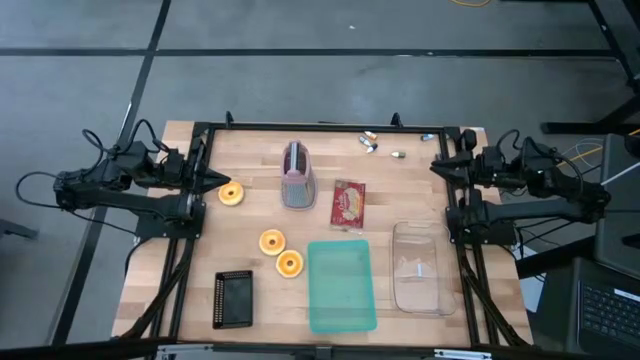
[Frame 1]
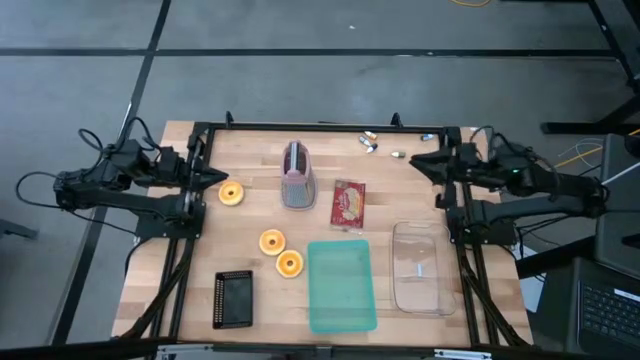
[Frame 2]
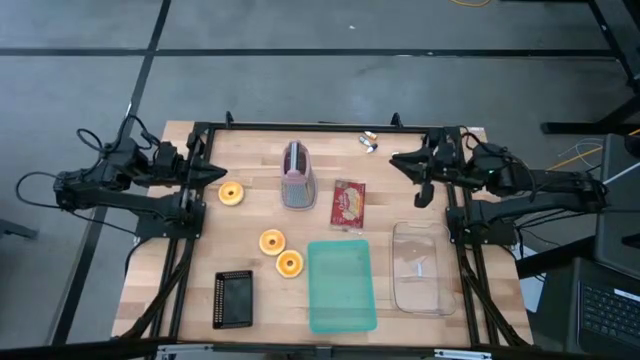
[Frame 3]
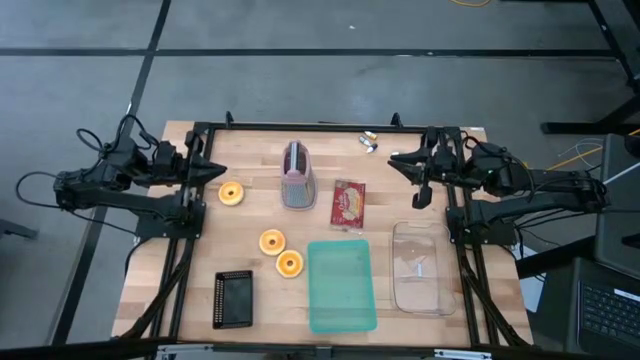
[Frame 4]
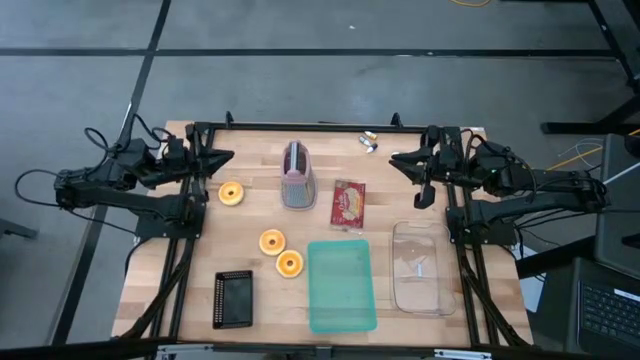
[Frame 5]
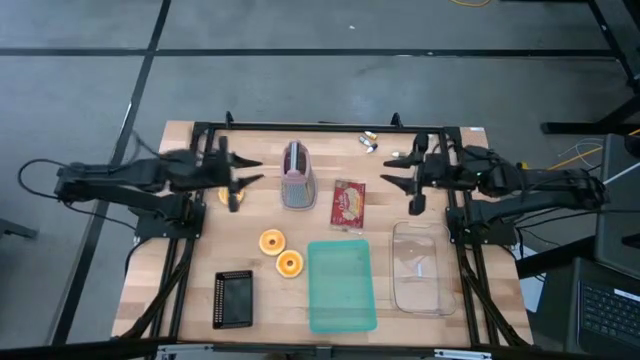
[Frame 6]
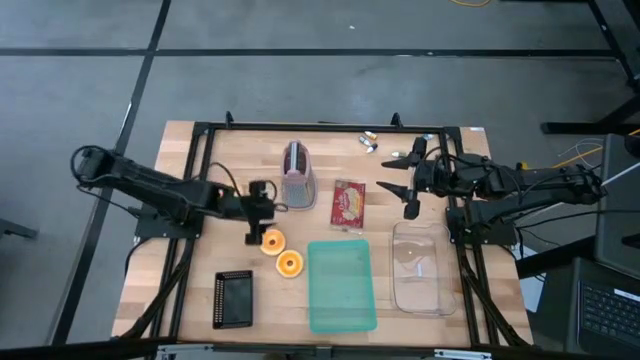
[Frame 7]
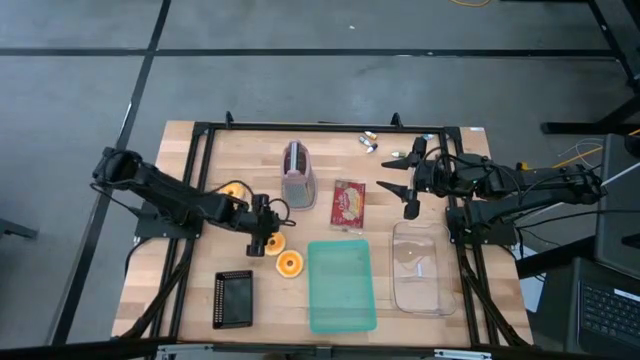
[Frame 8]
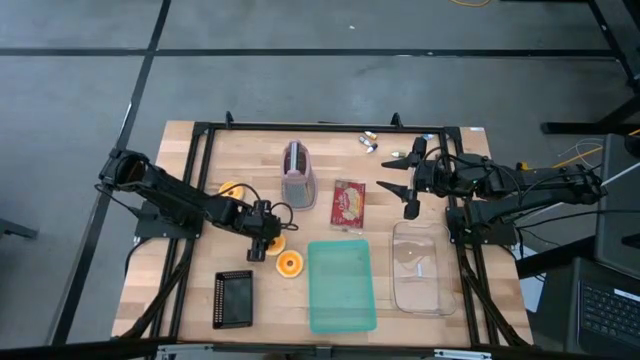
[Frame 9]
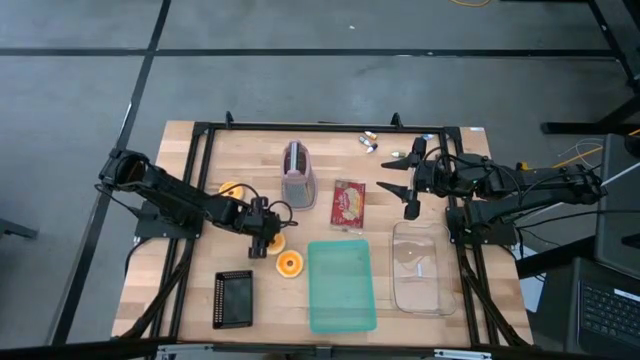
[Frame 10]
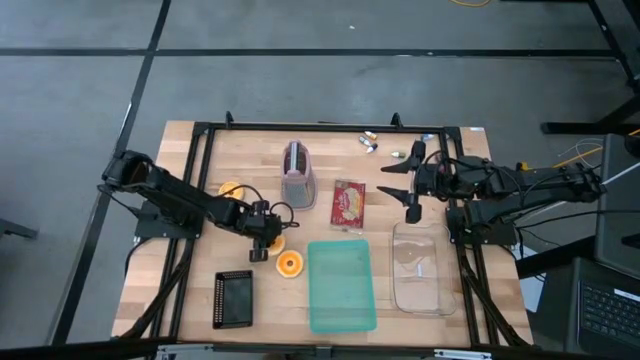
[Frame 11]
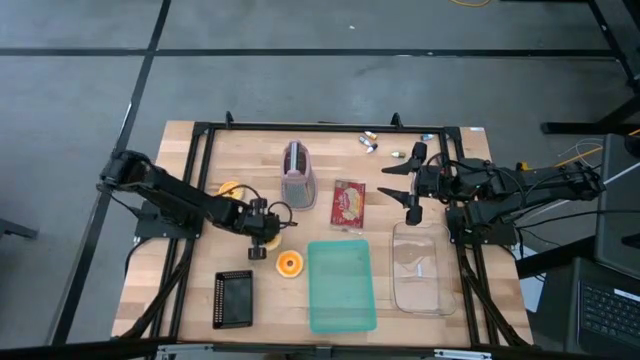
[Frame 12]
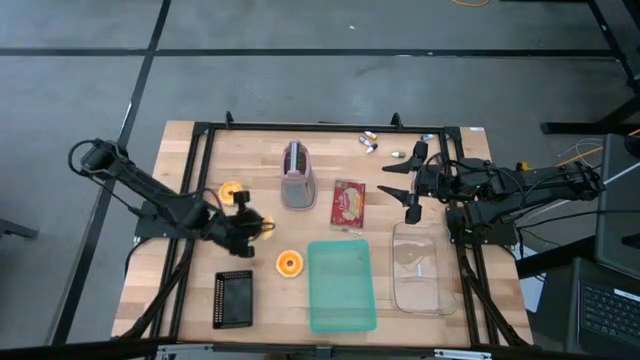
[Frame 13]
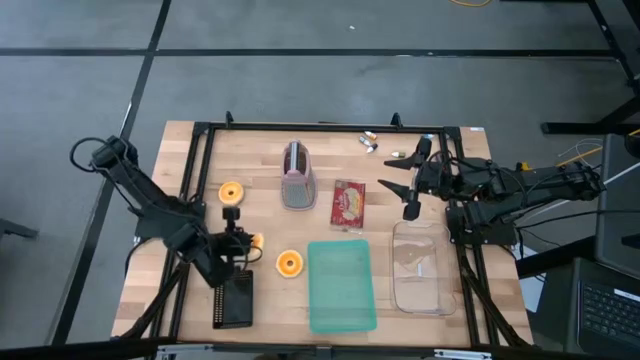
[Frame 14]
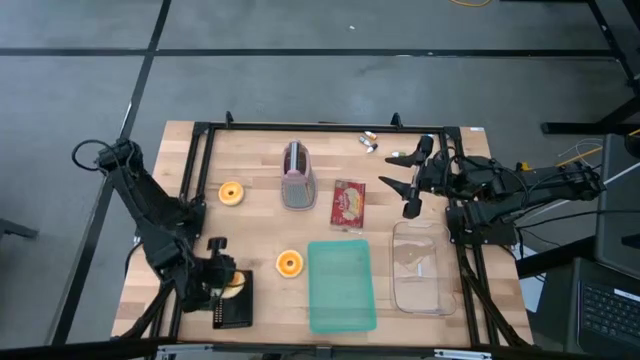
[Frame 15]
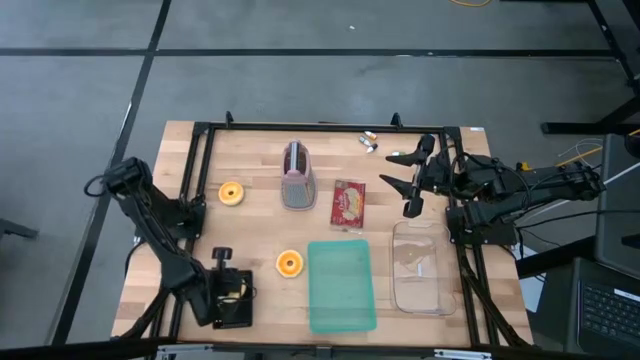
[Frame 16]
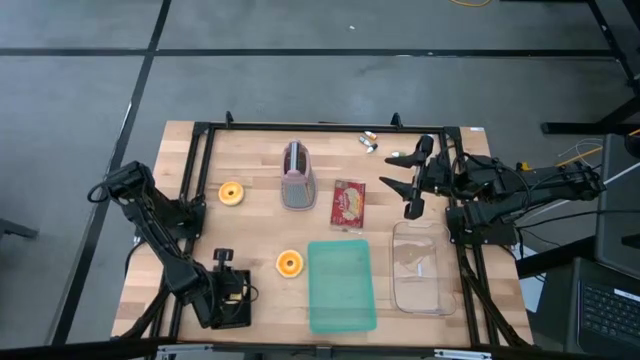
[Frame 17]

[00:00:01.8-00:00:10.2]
Task: Pick & Place Food Item
Put the middle yellow donut into the black bin

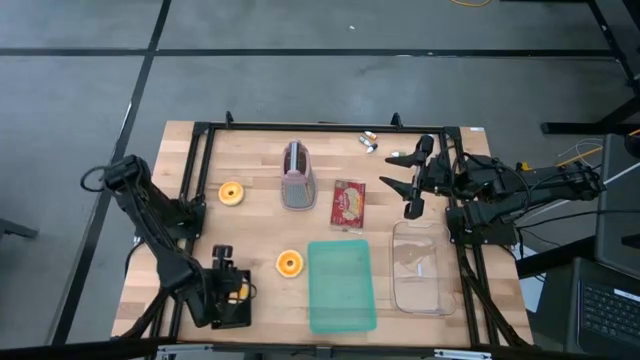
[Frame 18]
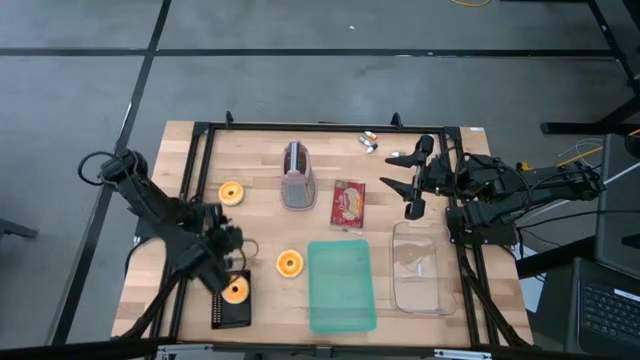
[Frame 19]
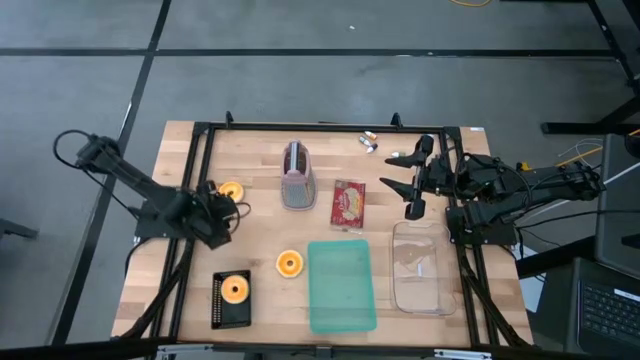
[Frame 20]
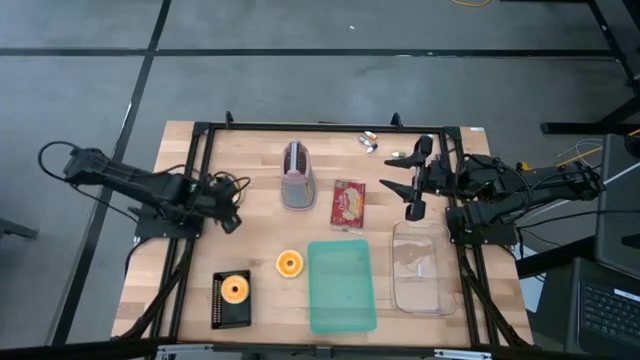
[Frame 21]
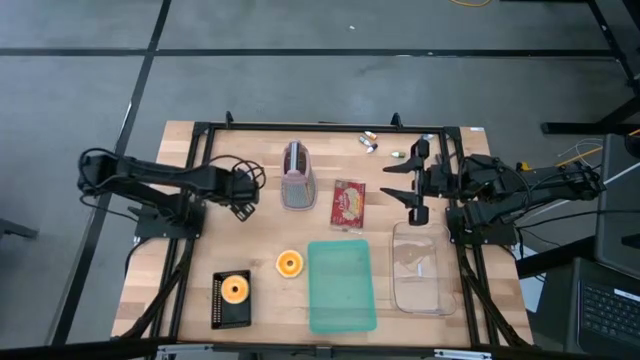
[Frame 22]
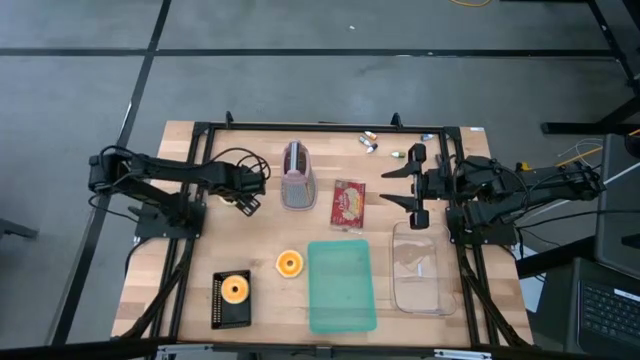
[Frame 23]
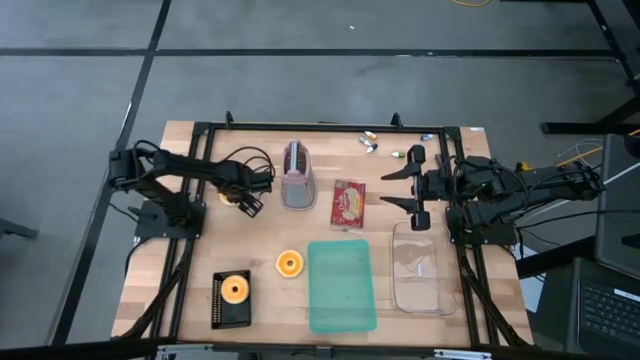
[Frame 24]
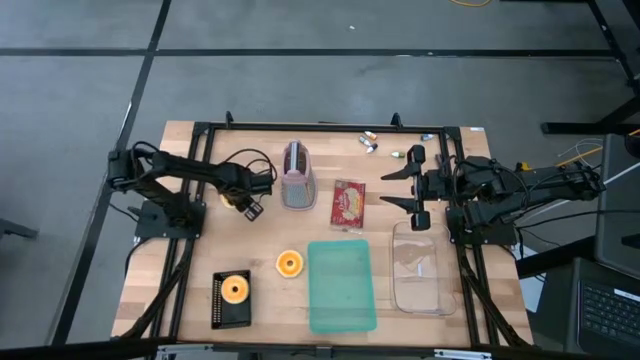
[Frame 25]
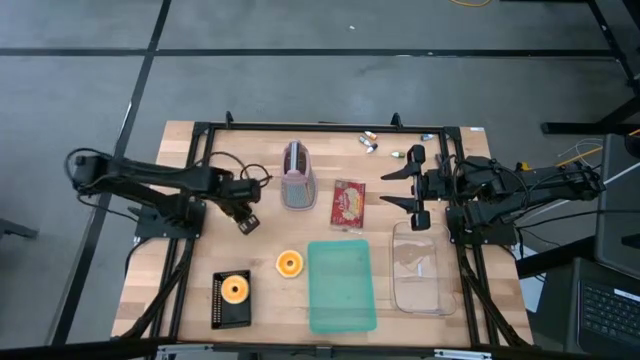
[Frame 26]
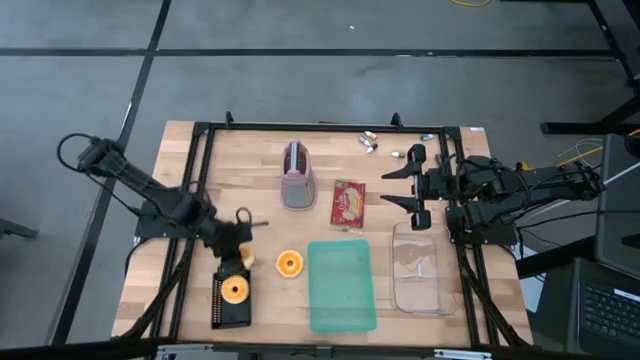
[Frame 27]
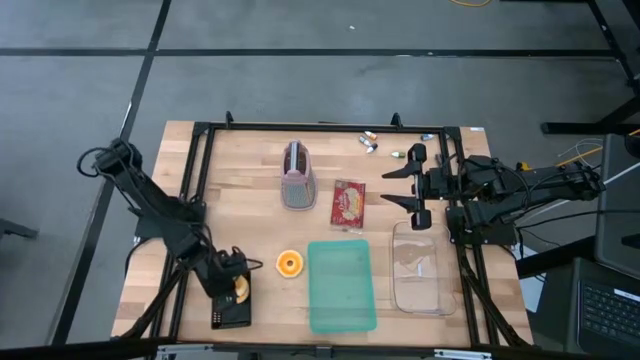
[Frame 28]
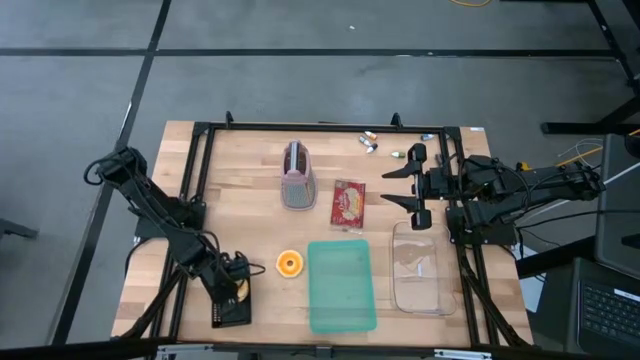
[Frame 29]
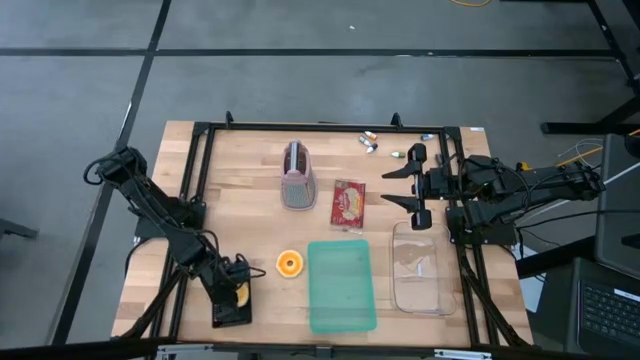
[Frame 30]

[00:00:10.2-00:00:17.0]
Put the top yellow donut into the black bin

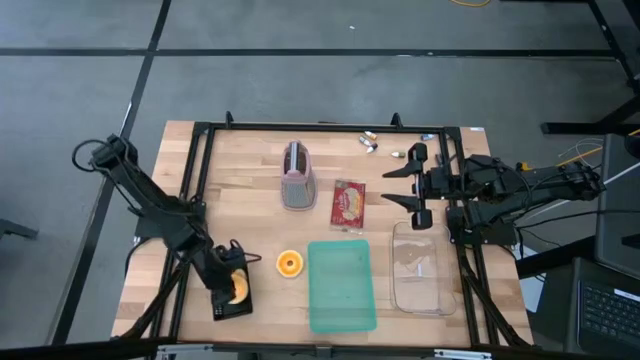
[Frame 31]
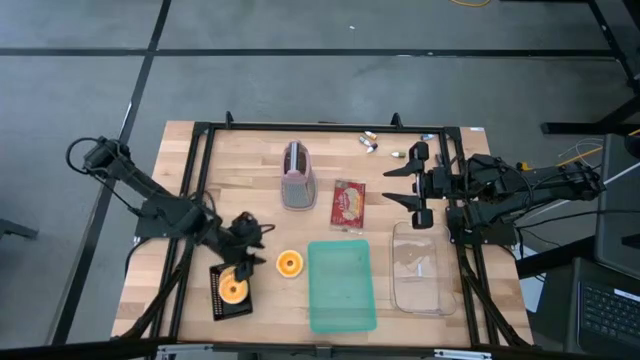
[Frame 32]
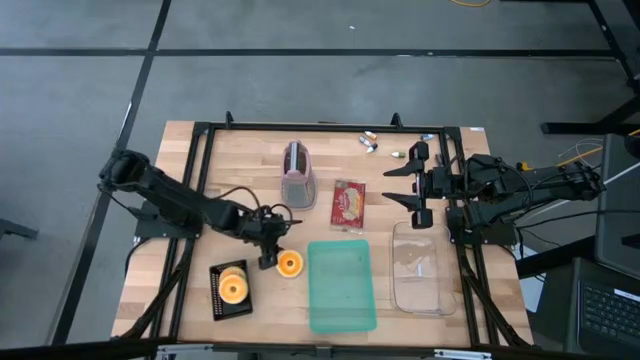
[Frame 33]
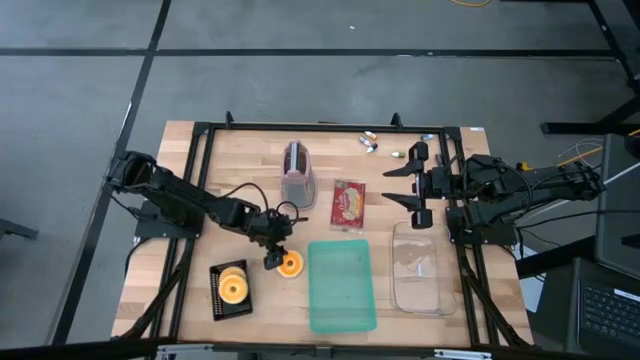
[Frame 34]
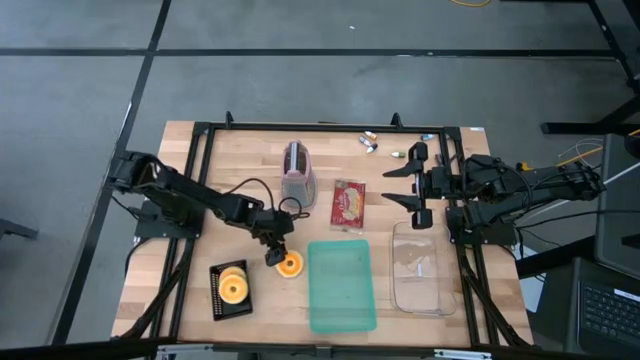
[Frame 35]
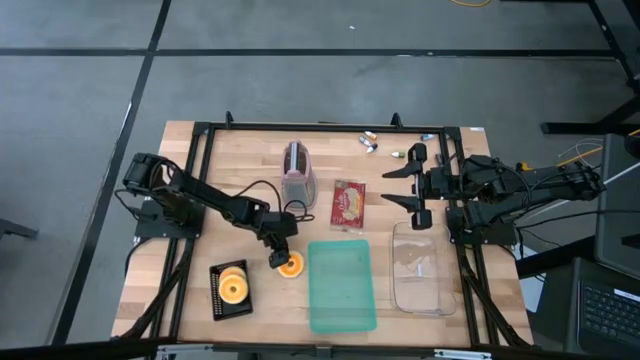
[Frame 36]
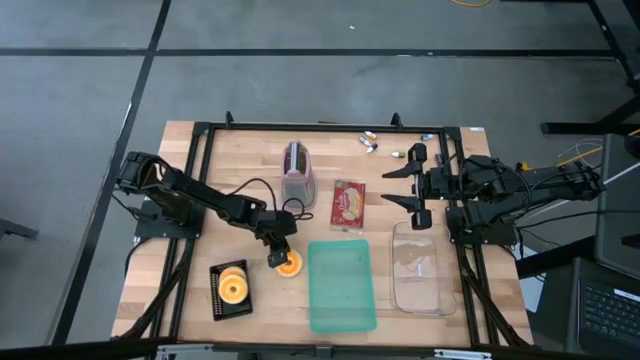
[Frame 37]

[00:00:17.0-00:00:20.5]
Put the yellow donut into the black bin

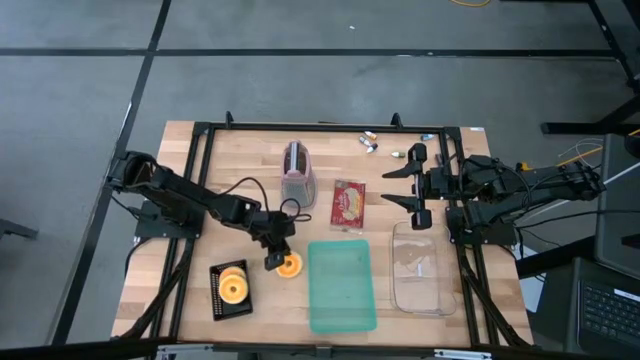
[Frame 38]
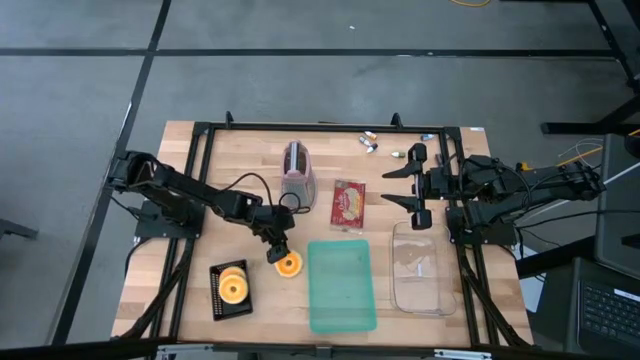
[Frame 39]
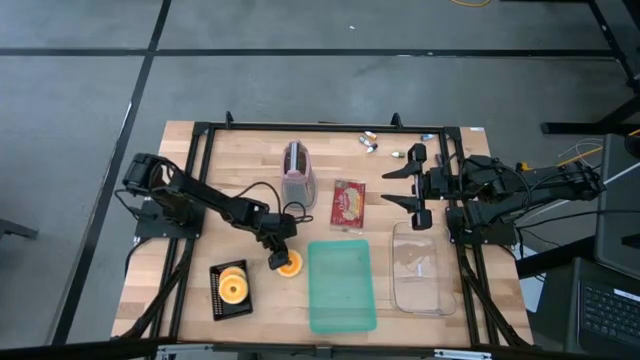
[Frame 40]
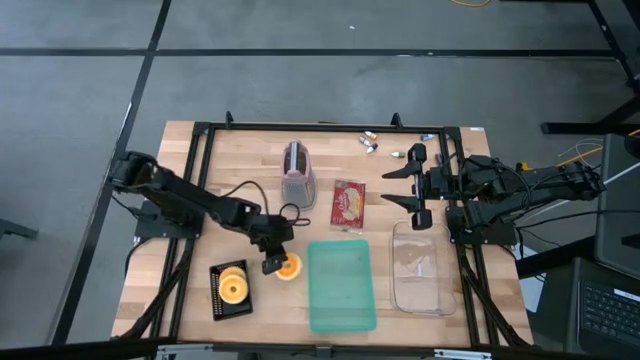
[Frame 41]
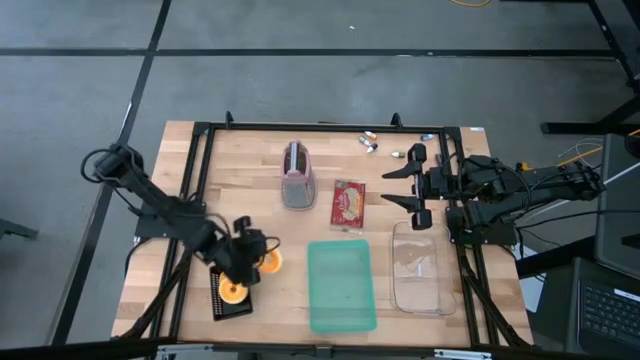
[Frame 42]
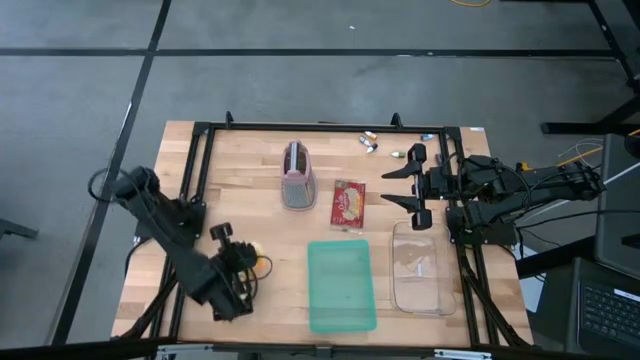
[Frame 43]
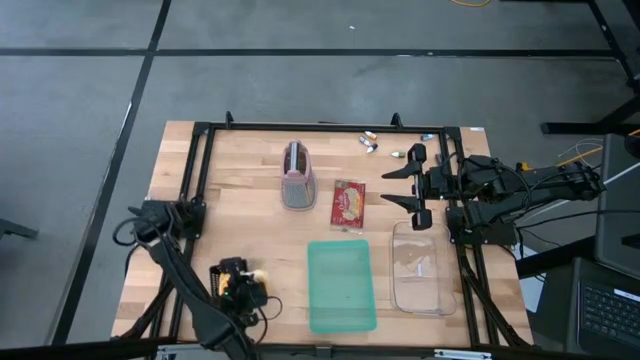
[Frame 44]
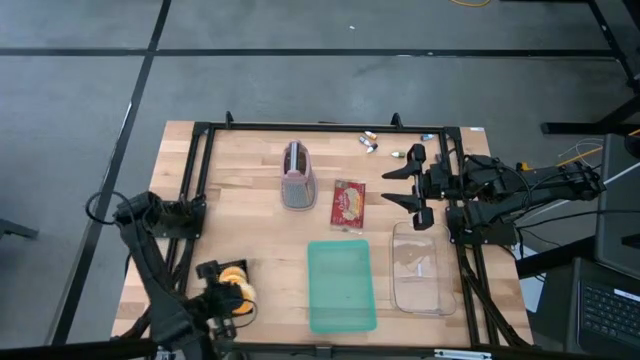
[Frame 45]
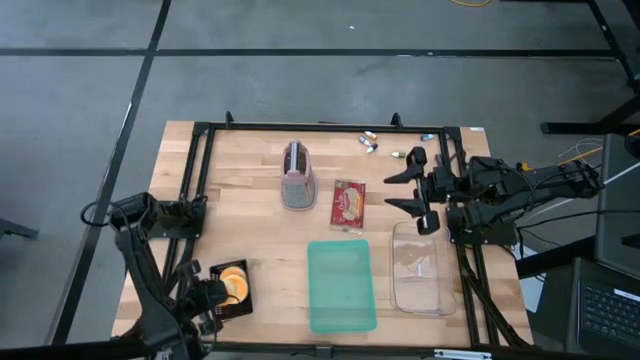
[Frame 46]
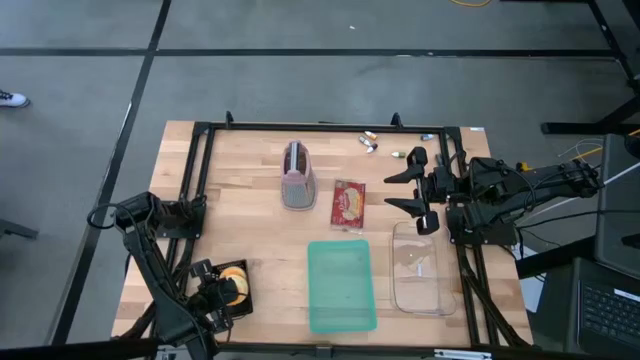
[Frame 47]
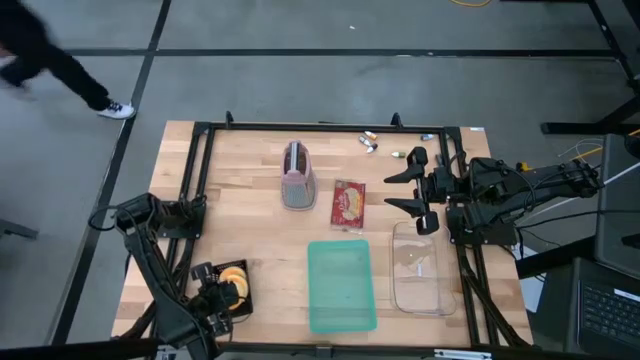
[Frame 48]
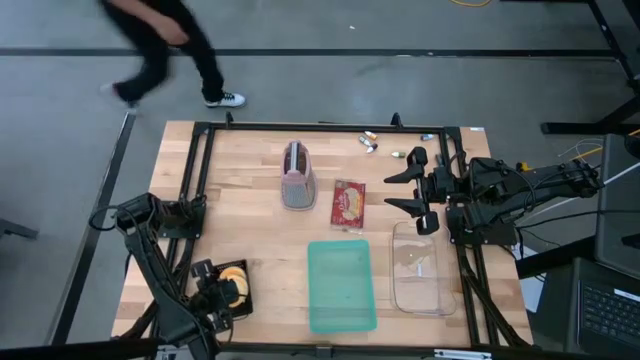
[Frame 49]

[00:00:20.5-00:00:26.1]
Put the yellow donut into the black bin
